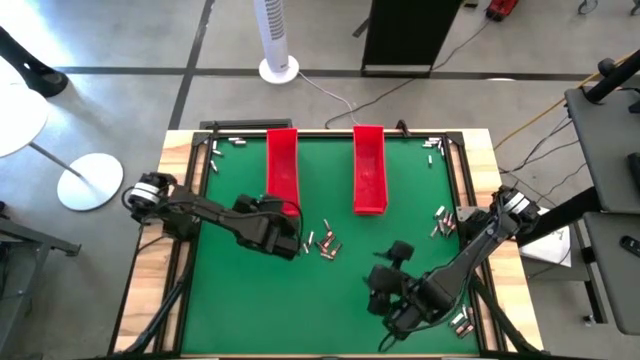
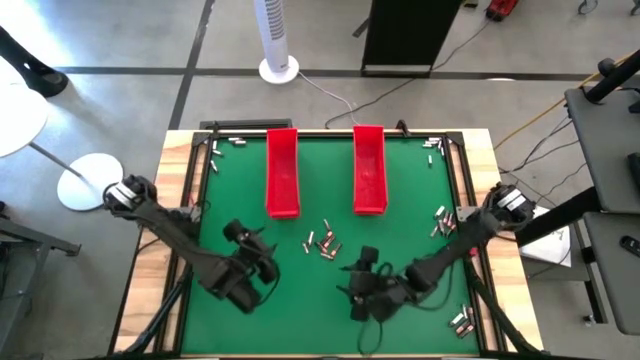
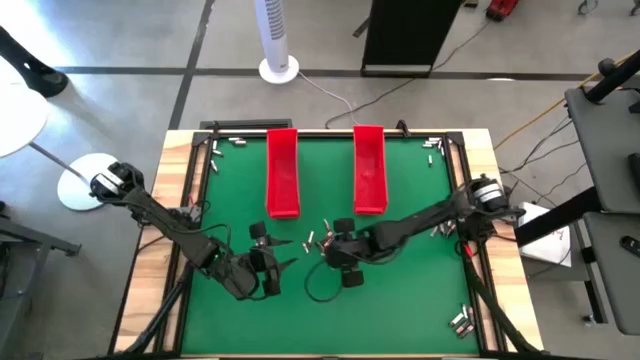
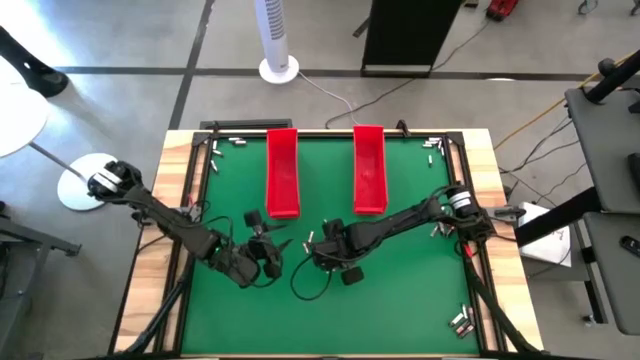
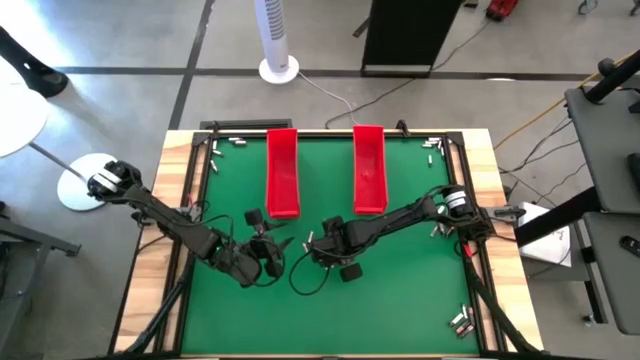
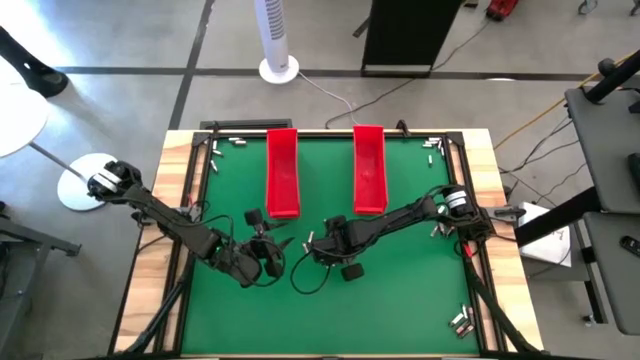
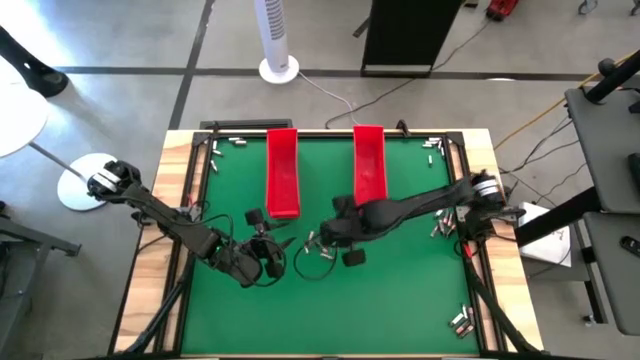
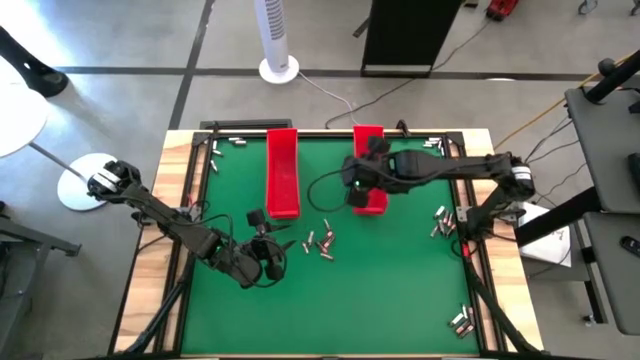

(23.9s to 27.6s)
Task: Sort batteries
Put the black battery into the right red bin

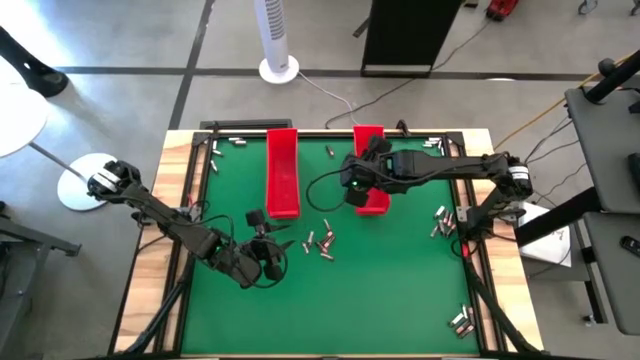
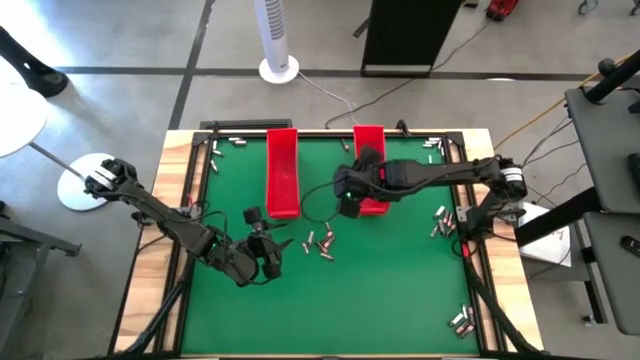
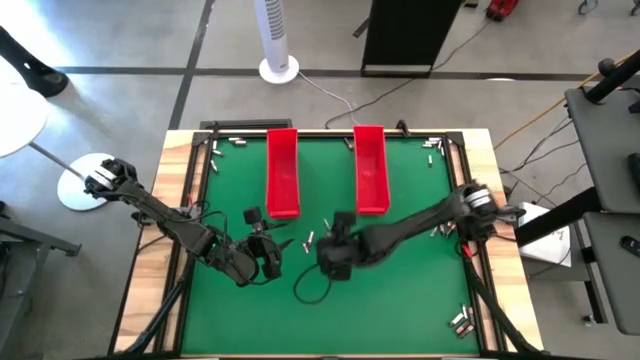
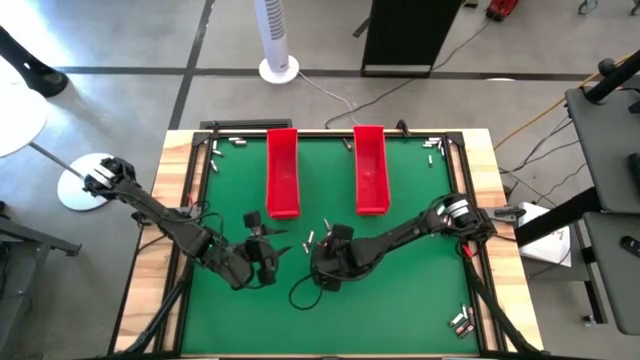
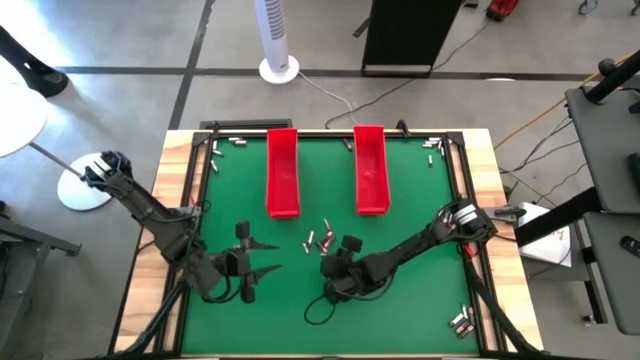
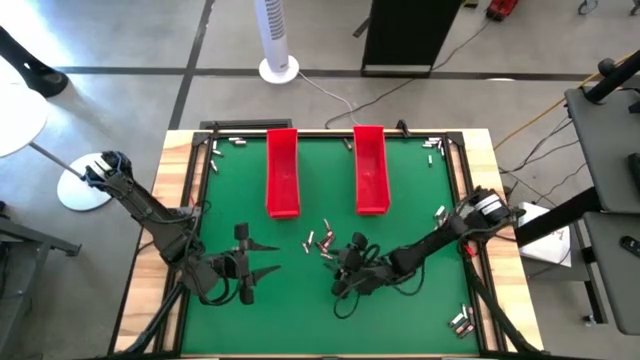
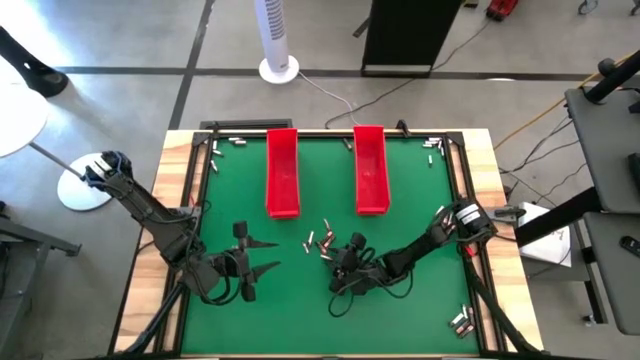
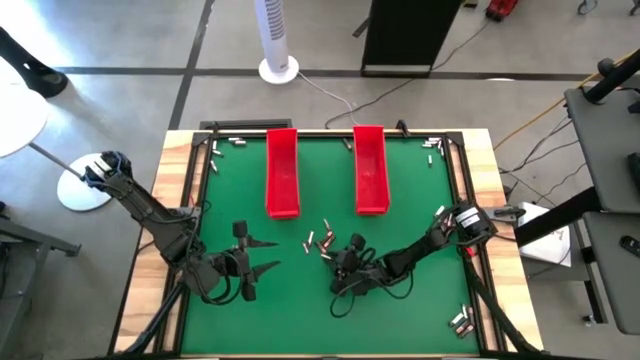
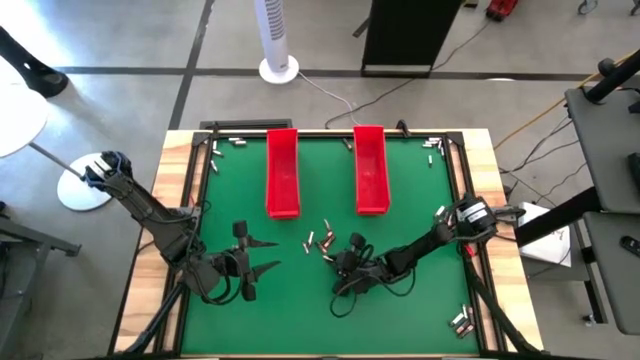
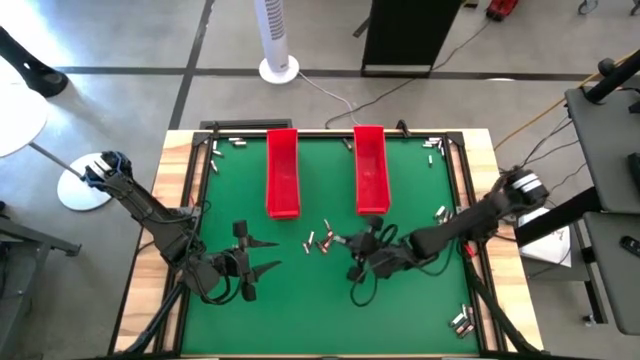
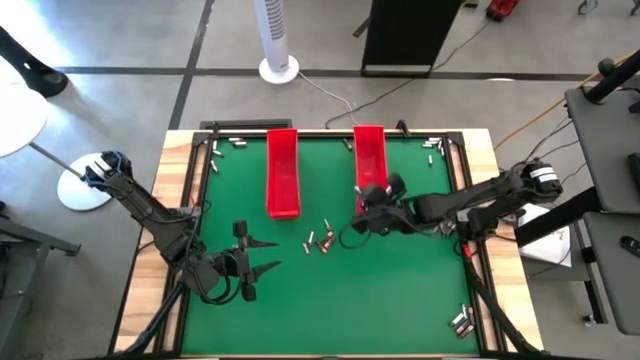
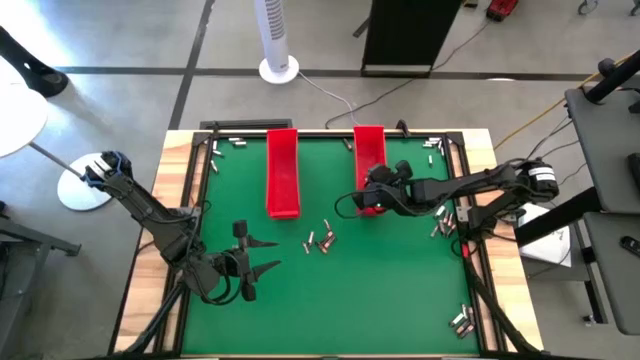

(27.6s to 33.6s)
Put the silver battery into the right red bin

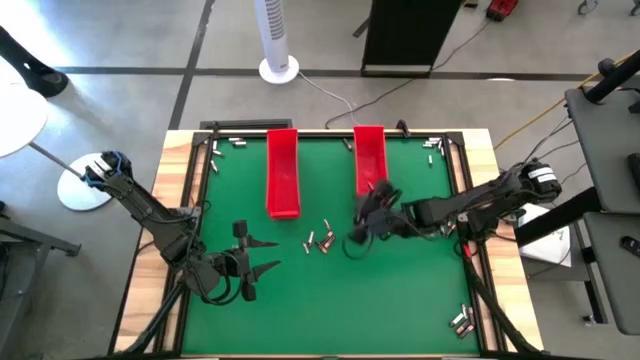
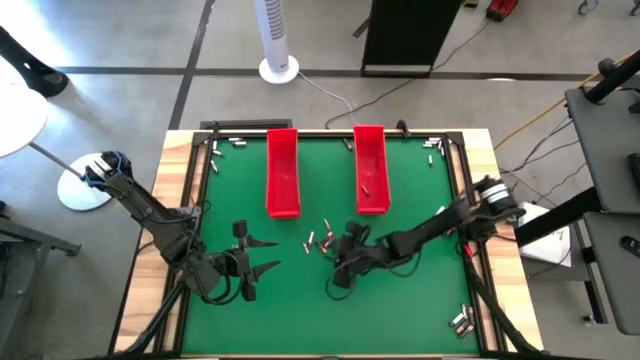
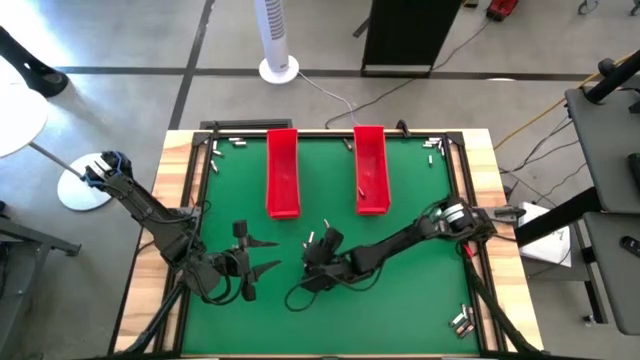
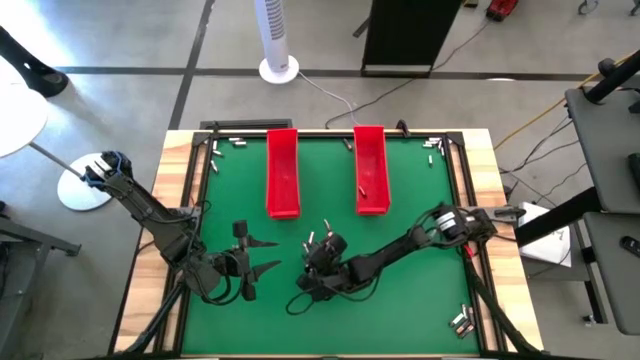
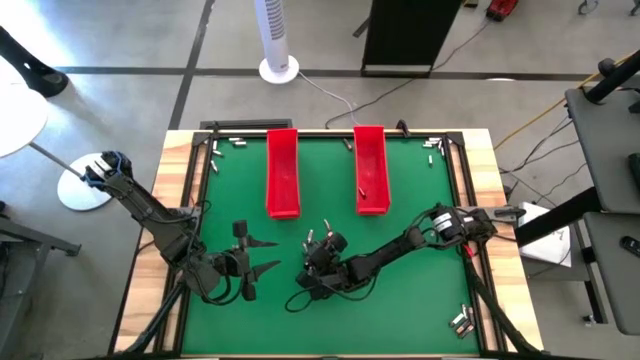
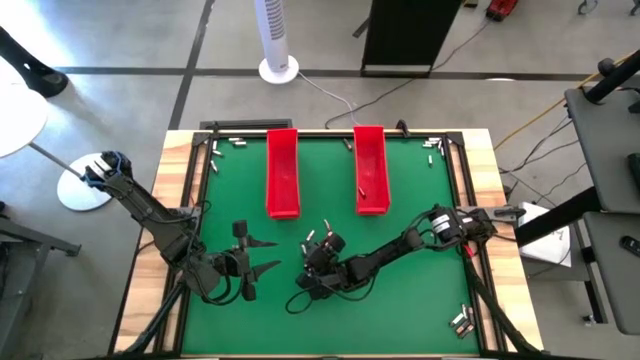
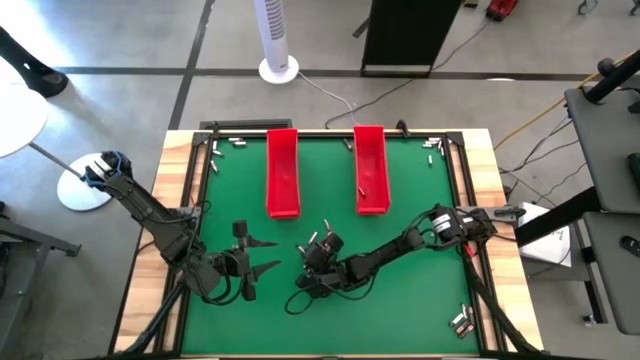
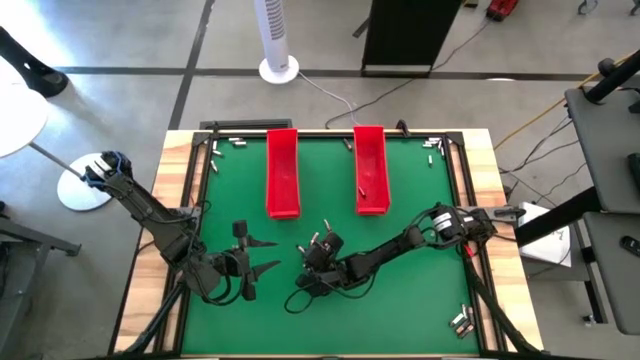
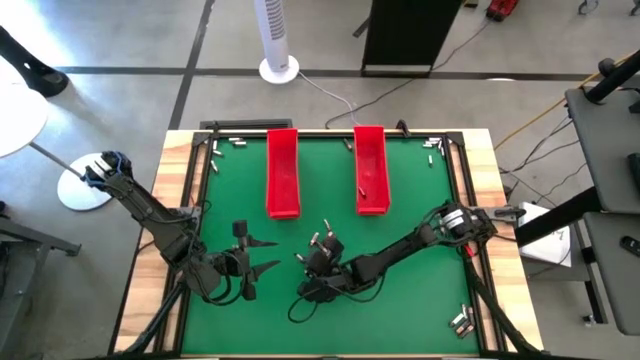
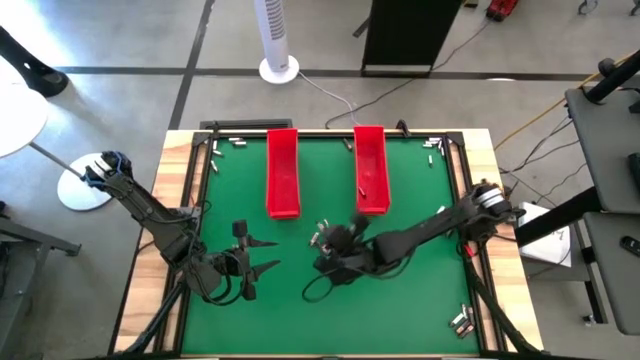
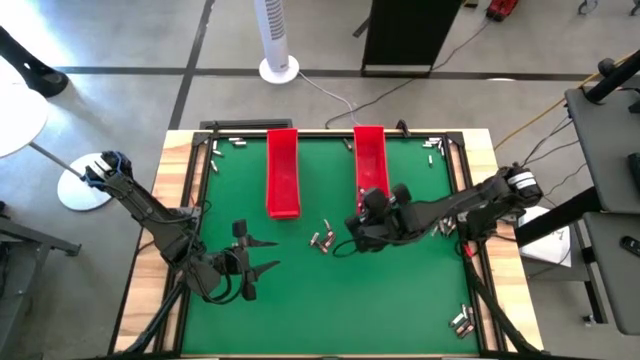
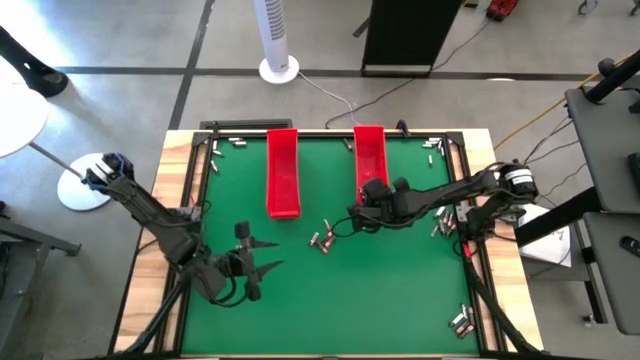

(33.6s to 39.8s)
Put the silver battery into the right red bin

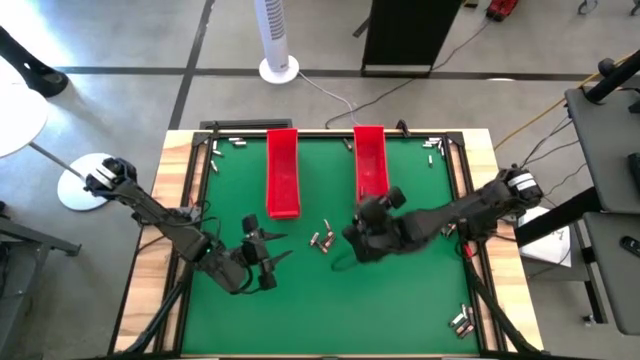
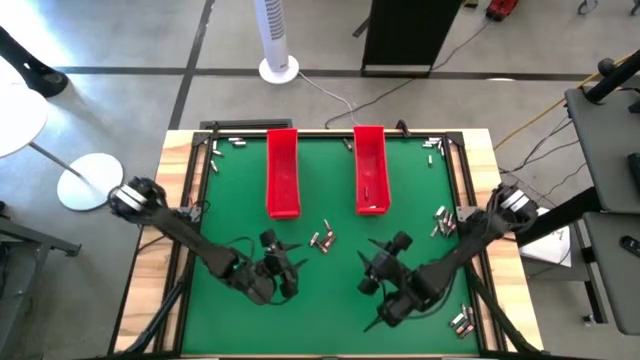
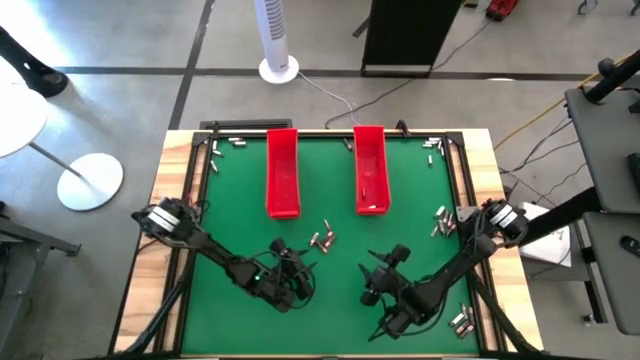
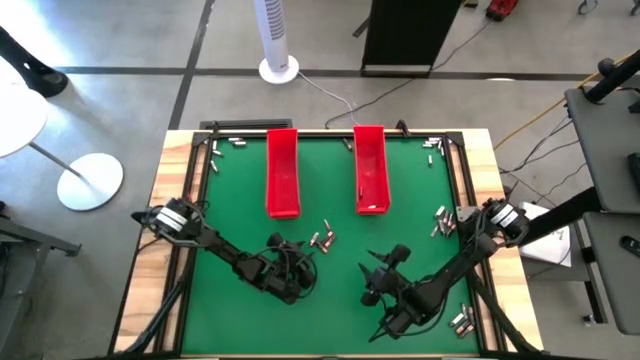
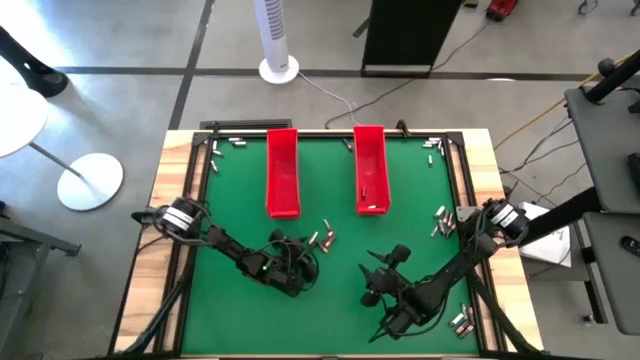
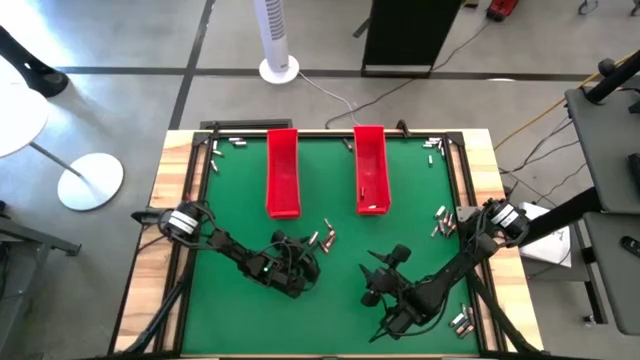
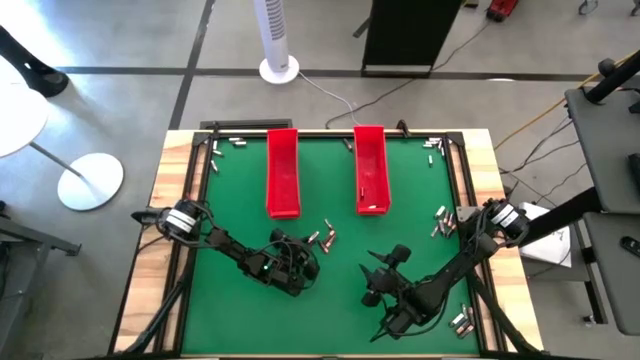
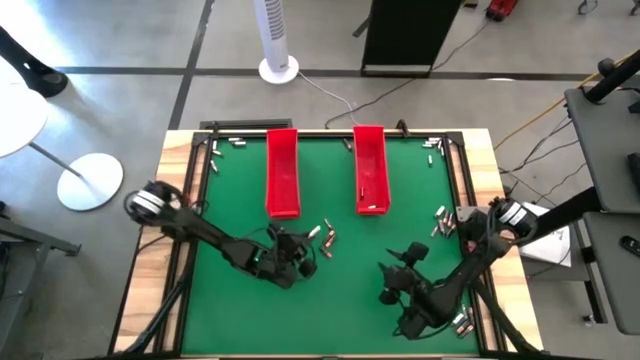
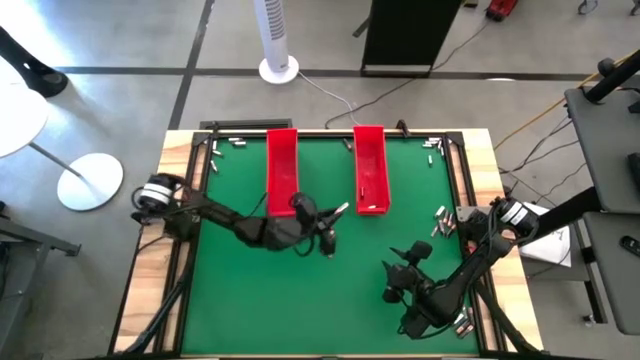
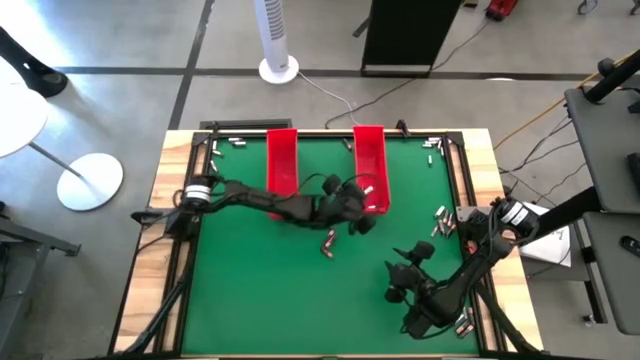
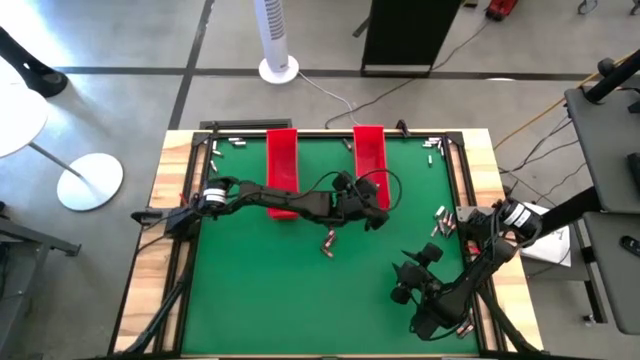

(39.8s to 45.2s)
Put the silver battery into the right red bin
